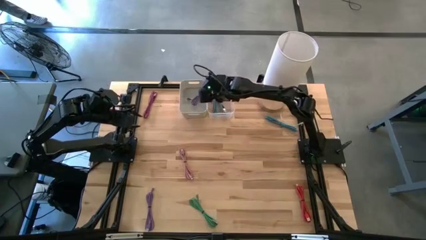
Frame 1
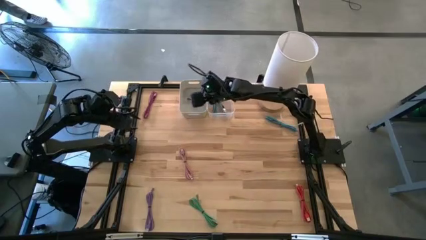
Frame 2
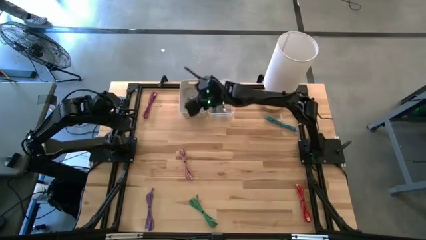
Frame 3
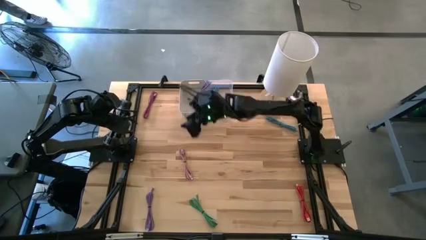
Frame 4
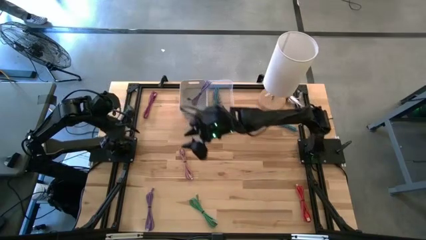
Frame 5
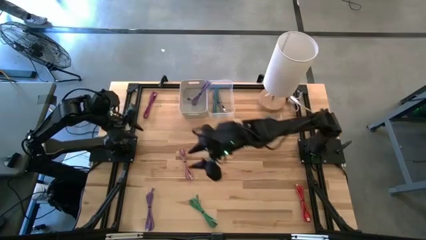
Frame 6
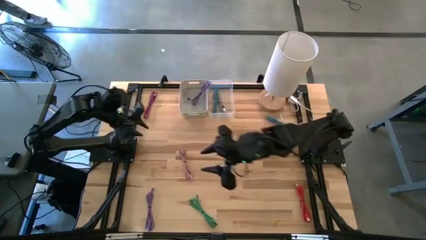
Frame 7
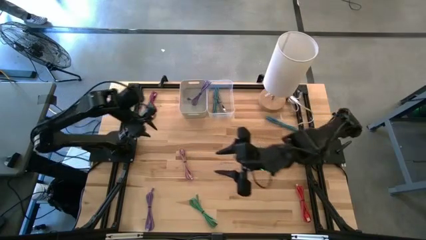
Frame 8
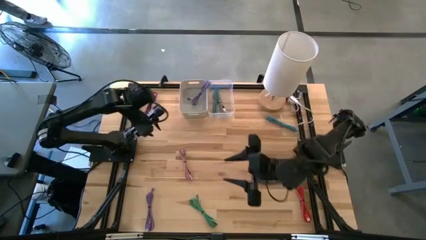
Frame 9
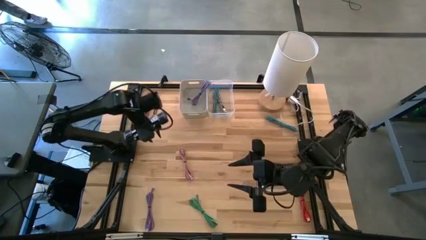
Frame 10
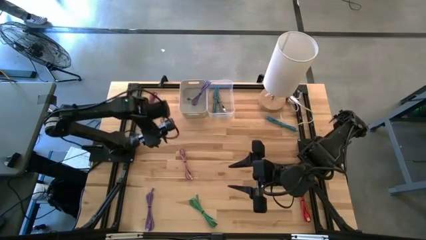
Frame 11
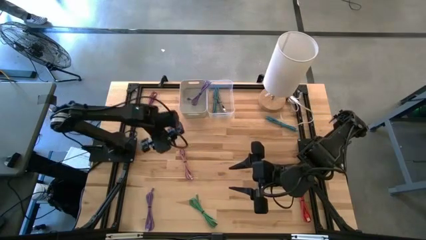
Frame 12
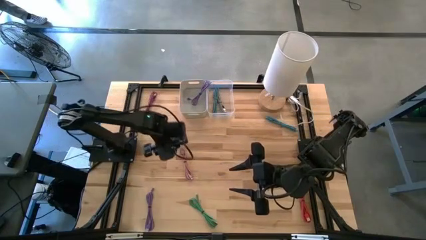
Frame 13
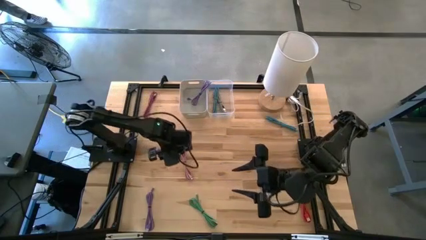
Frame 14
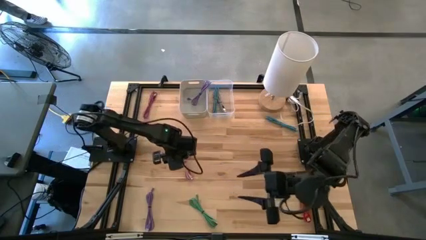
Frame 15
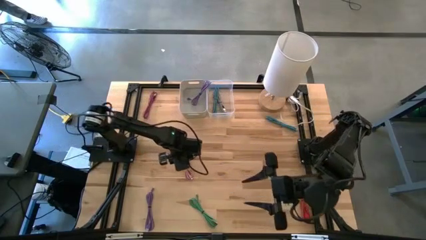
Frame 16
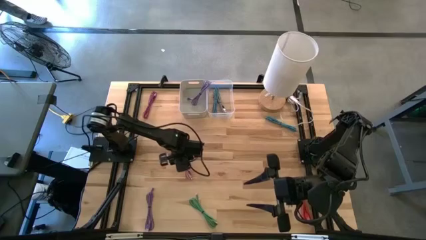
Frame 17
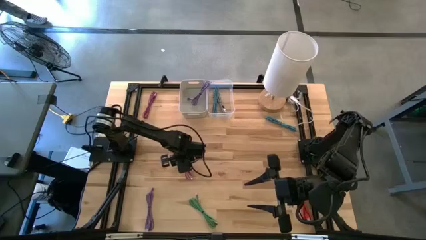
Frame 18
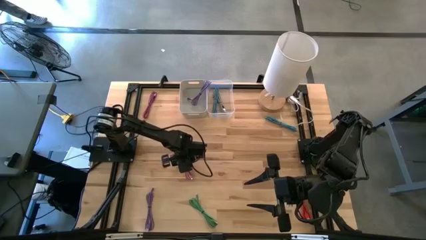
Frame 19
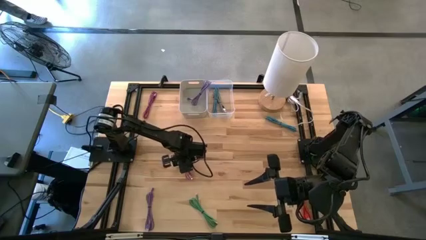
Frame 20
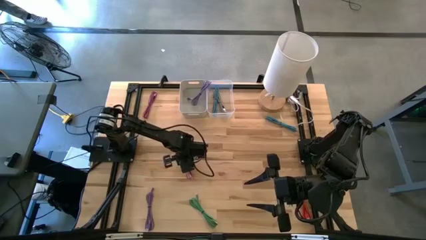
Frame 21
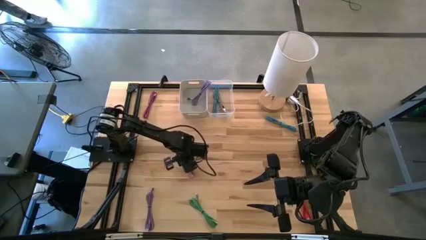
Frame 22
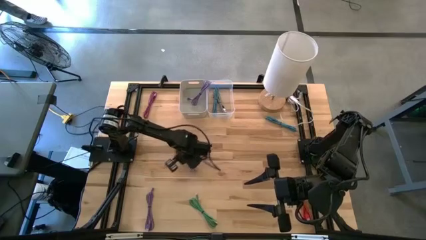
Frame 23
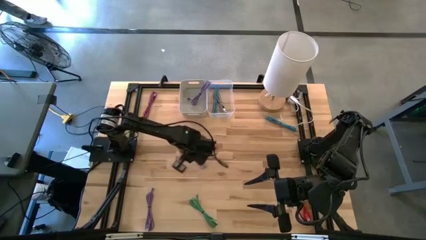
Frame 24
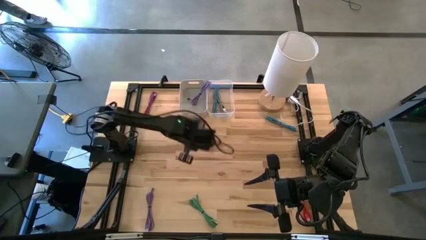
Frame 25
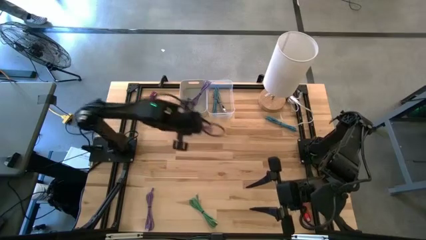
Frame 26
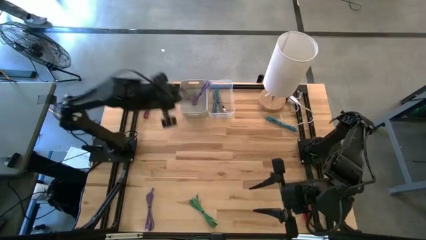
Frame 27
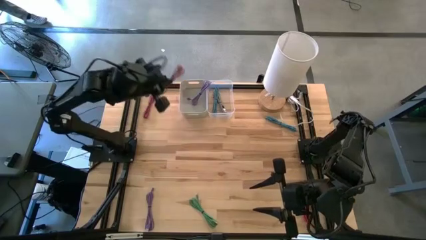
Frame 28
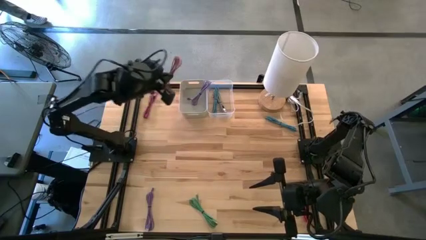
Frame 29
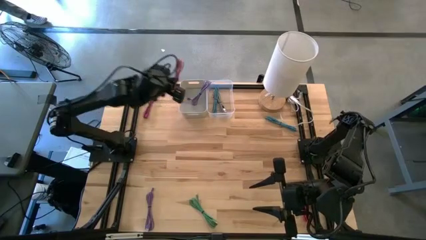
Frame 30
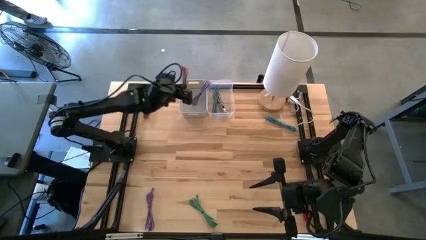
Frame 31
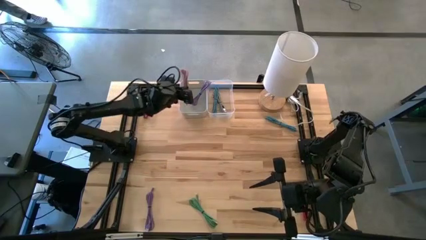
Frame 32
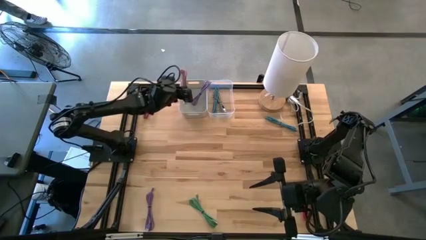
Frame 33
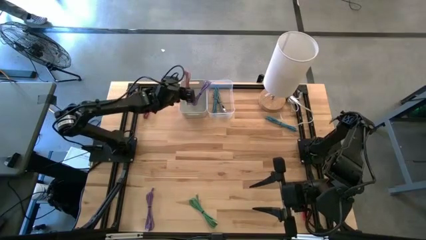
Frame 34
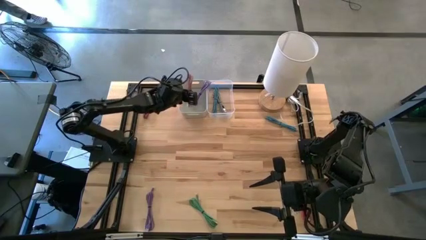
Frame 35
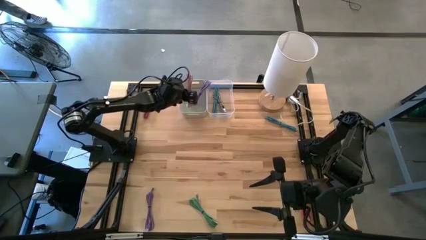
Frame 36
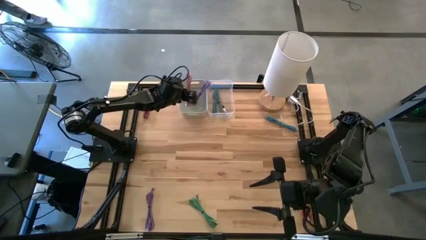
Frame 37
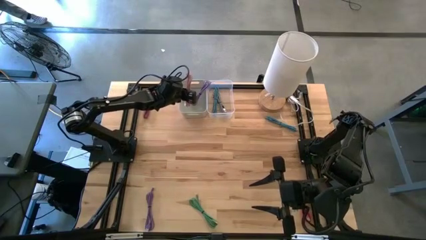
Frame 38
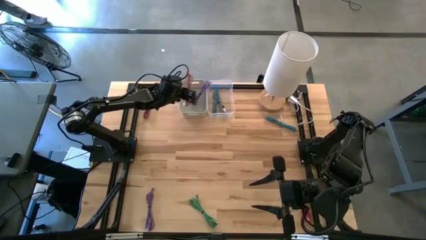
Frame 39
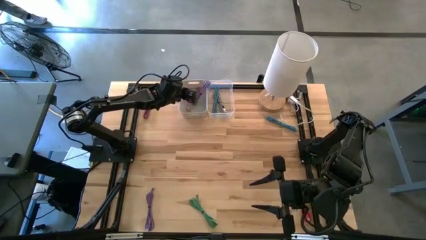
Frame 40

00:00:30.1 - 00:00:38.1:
Task: Pick & Place USB Port
Put the pink USB cable into the gray bin

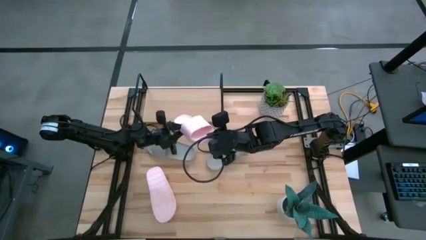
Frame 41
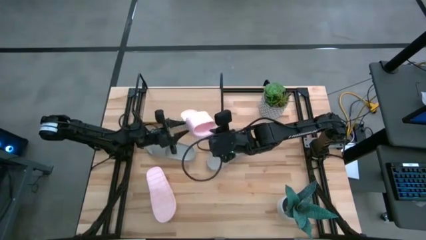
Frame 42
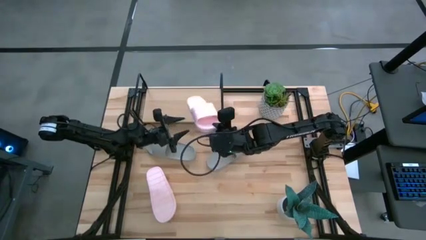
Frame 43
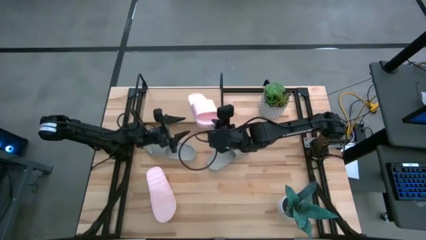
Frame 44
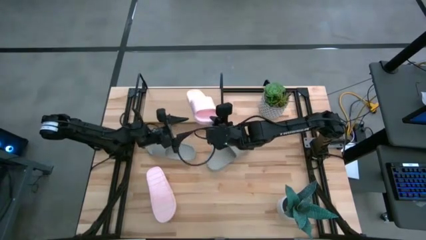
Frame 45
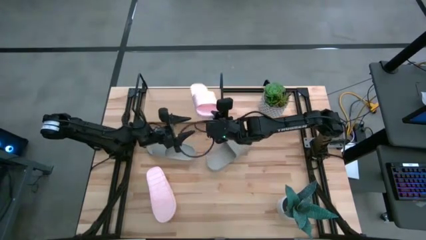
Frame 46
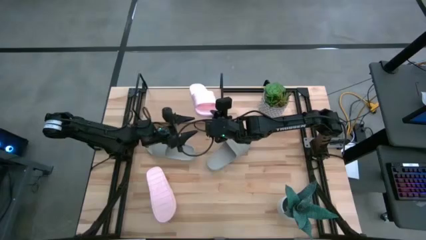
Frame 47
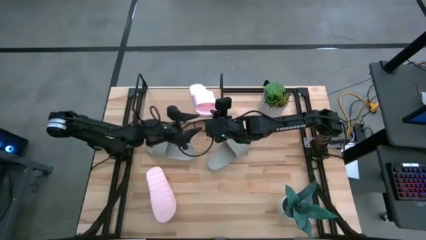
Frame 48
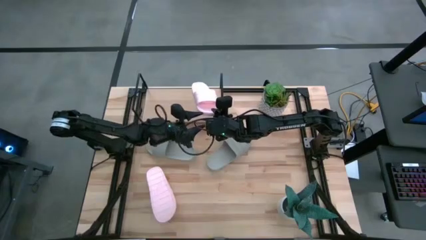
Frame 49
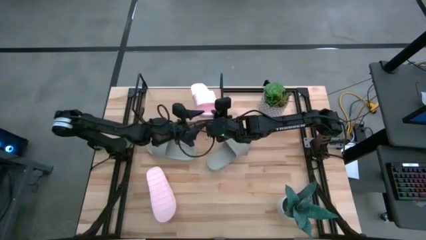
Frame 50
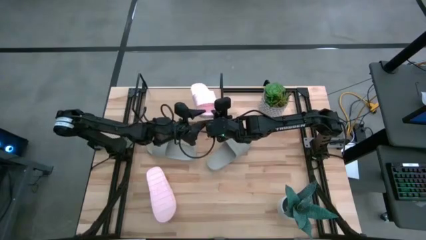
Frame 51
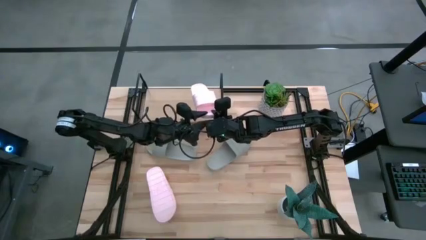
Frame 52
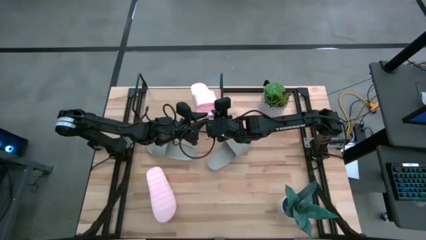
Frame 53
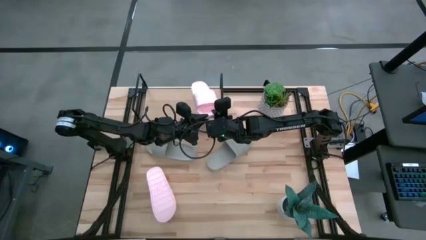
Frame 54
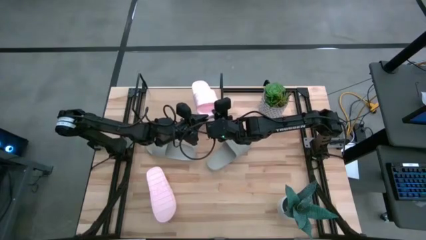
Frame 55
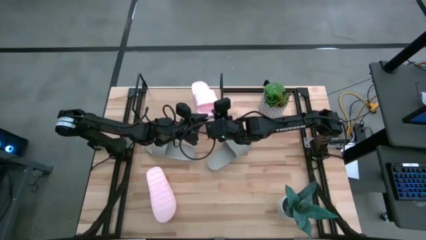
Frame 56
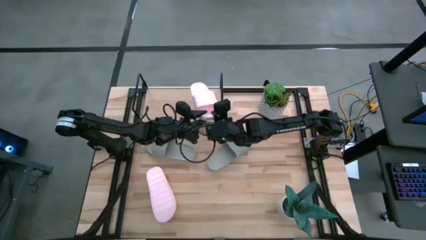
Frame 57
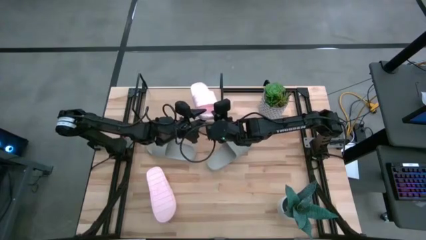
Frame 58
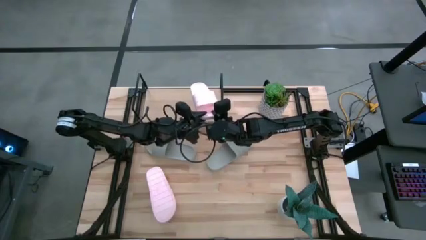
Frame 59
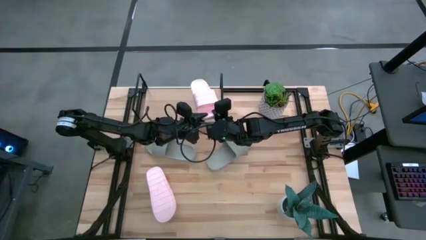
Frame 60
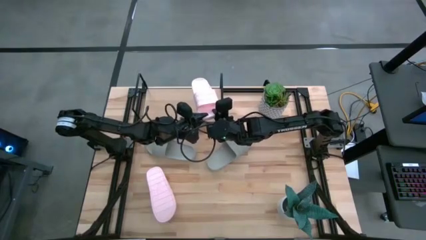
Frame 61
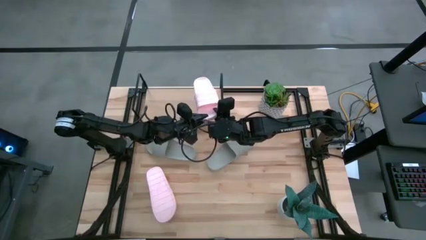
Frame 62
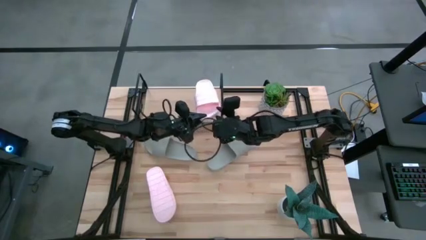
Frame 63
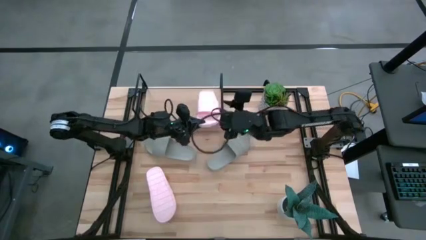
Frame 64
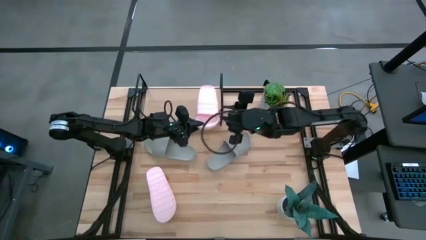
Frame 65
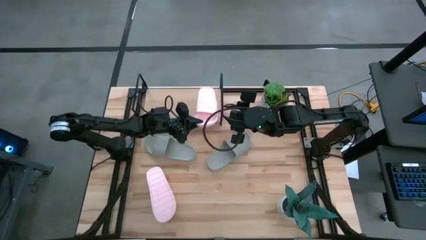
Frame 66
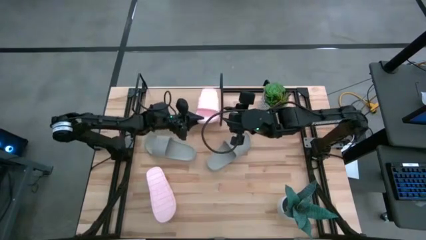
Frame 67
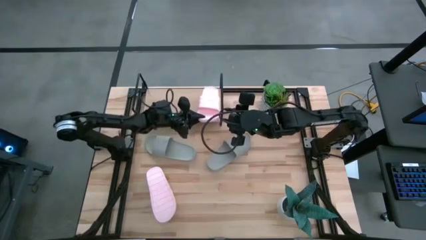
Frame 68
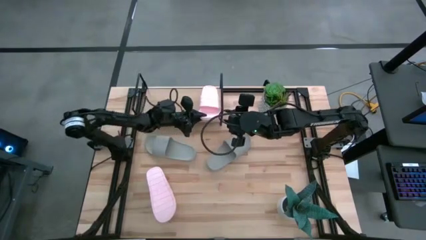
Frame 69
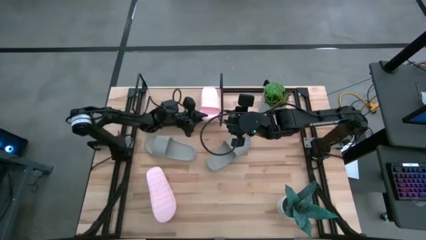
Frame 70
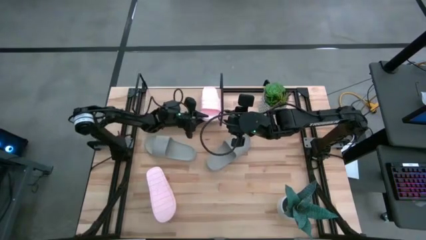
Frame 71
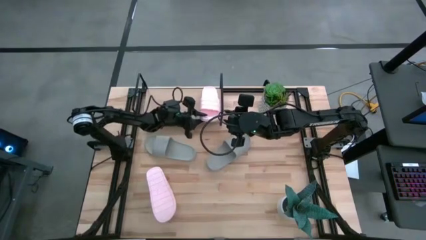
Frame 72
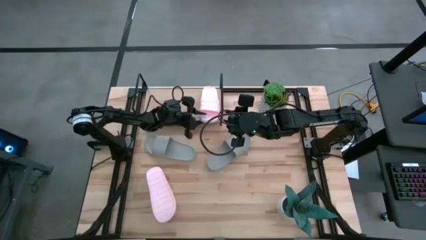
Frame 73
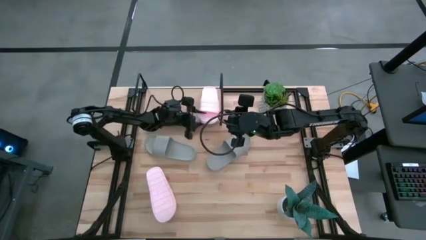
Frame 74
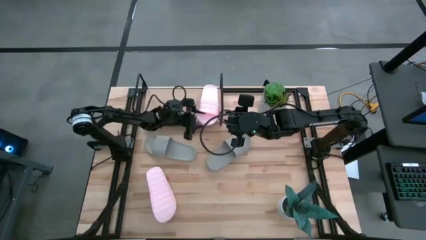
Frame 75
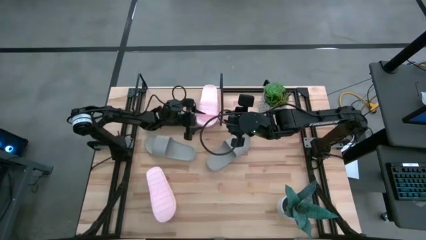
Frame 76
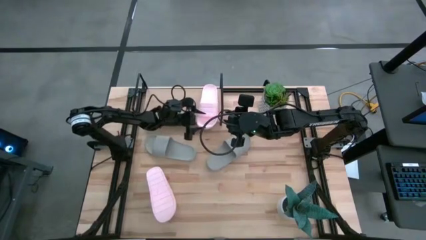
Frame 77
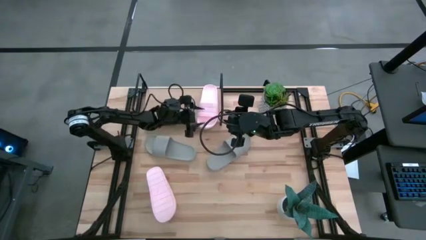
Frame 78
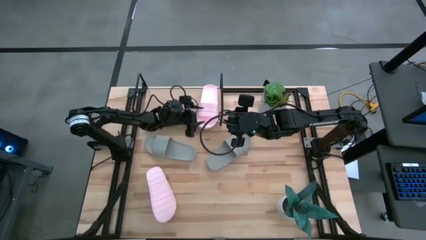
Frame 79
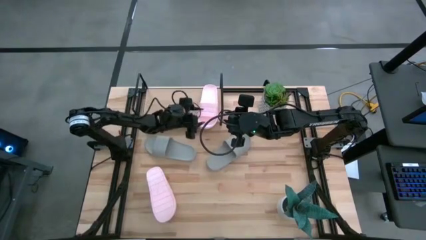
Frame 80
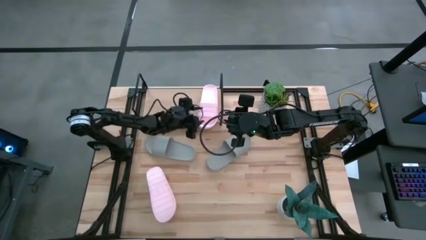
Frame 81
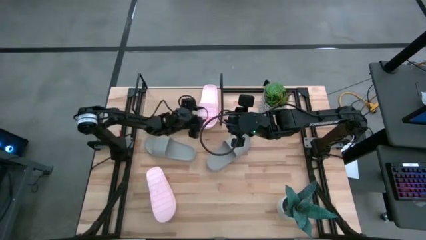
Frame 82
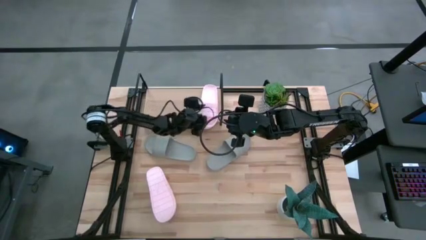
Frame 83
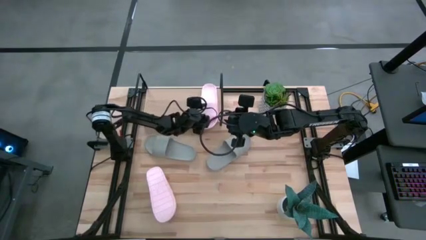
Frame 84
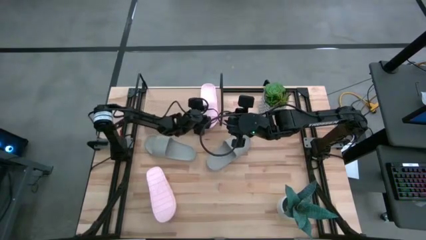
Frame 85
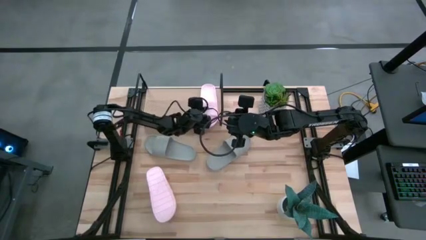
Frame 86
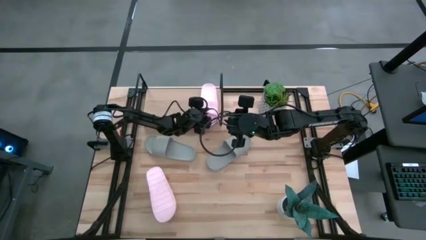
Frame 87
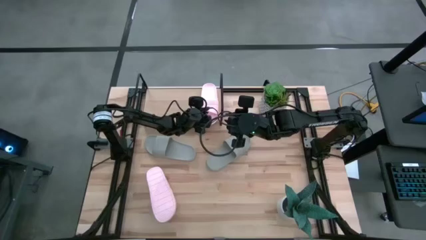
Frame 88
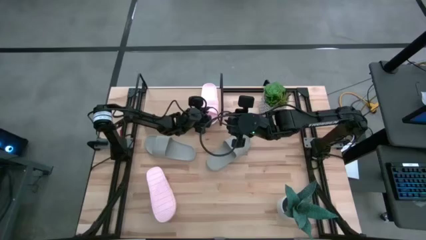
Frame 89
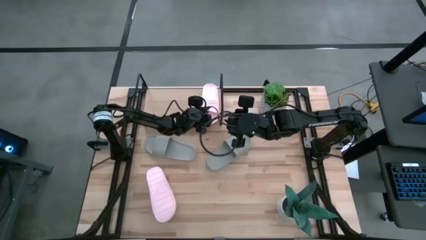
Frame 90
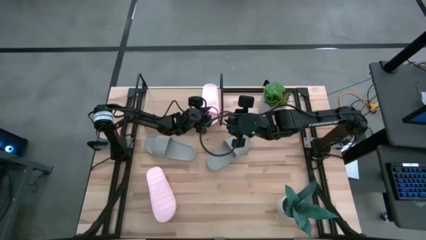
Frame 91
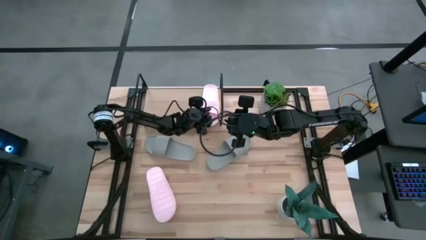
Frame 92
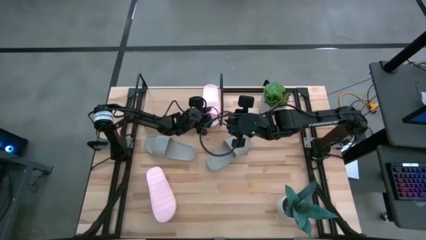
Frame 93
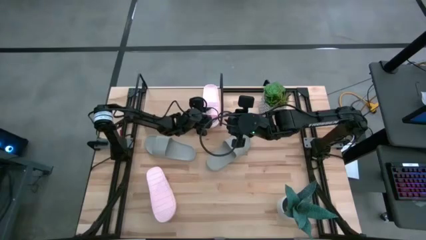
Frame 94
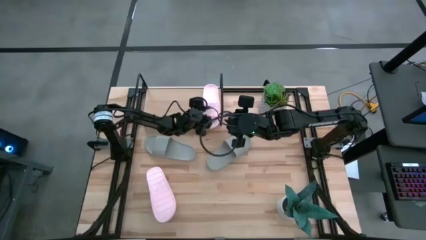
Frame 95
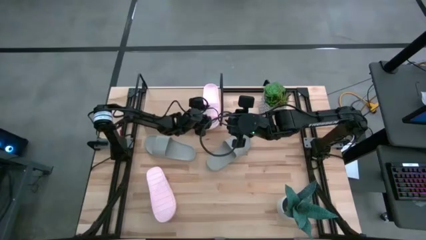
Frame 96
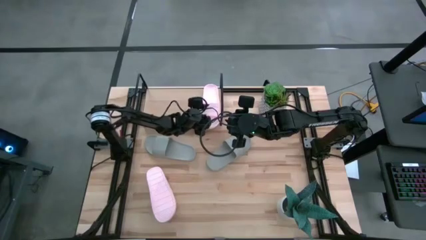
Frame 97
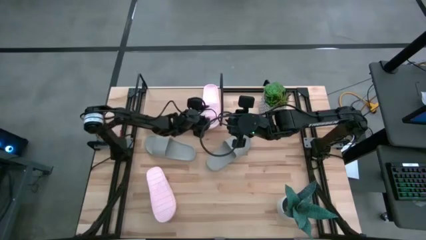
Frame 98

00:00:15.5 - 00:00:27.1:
Task: Pick and place slides into the shelf
Put the top pink slipper on the shelf
